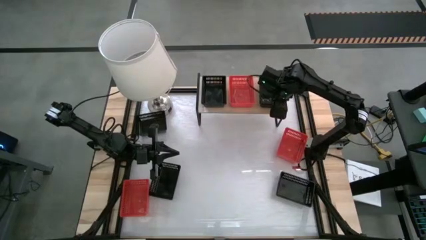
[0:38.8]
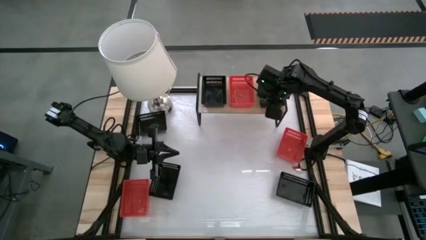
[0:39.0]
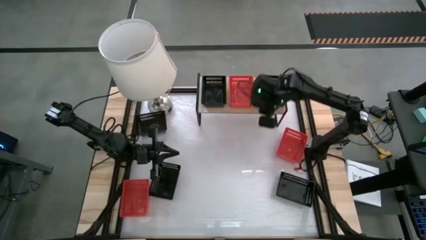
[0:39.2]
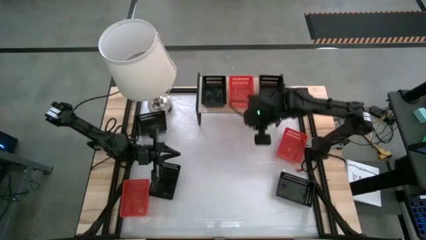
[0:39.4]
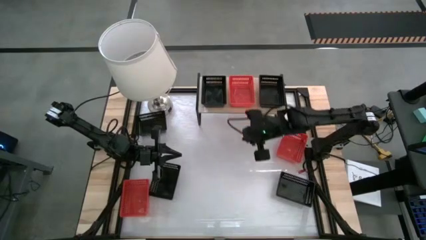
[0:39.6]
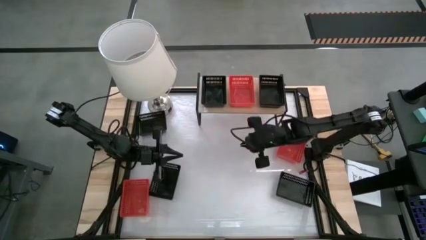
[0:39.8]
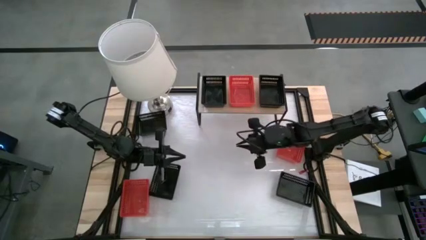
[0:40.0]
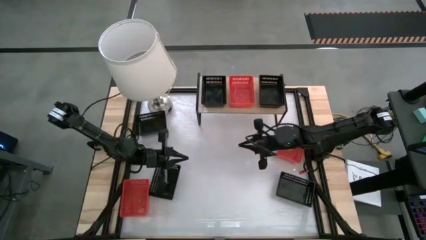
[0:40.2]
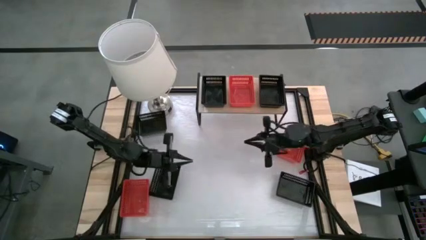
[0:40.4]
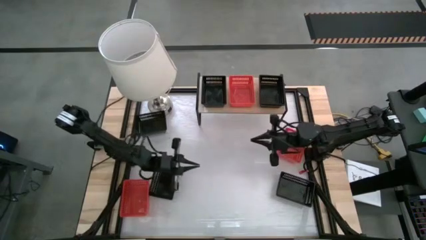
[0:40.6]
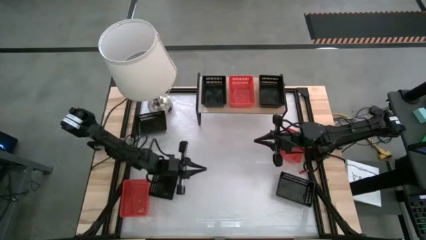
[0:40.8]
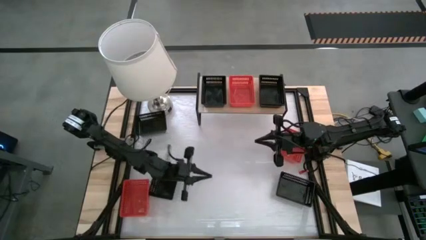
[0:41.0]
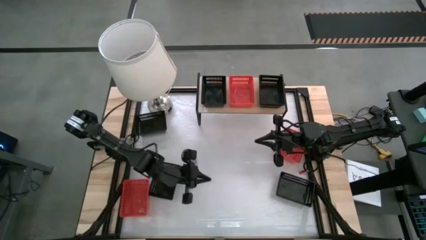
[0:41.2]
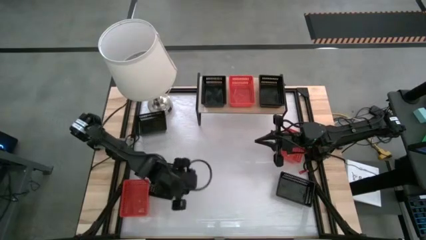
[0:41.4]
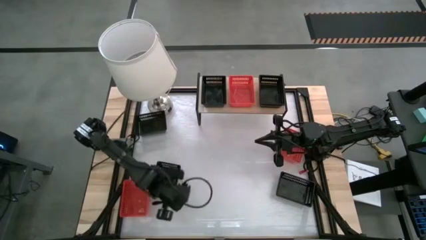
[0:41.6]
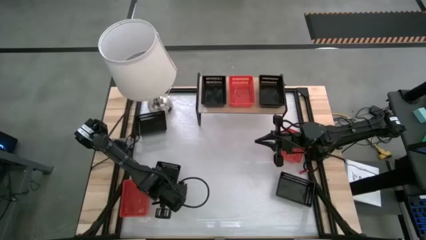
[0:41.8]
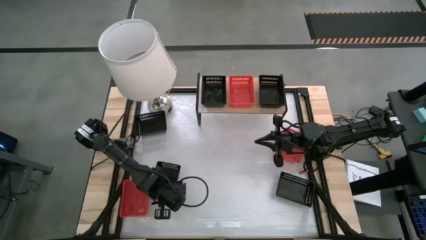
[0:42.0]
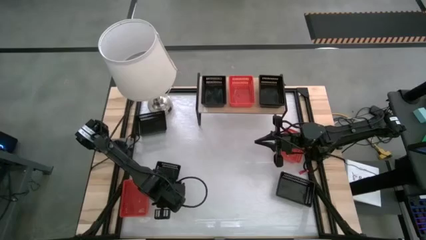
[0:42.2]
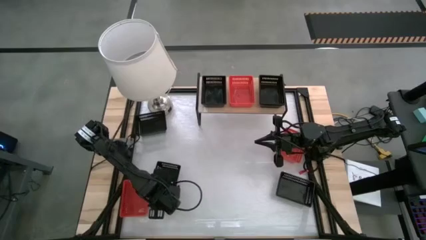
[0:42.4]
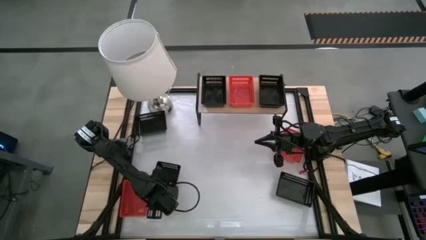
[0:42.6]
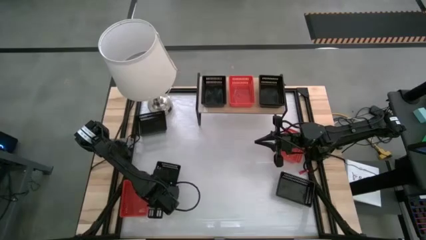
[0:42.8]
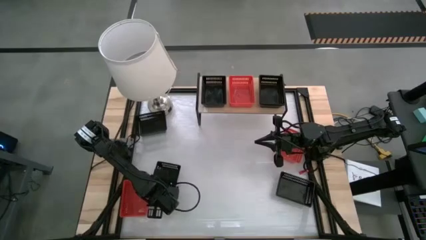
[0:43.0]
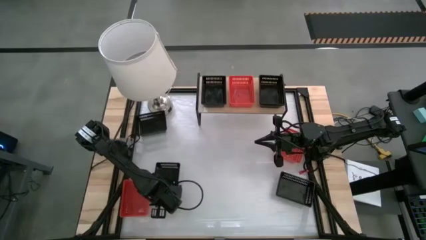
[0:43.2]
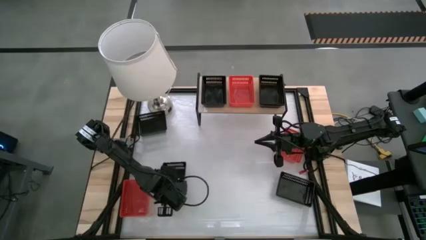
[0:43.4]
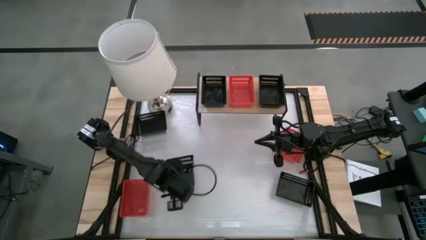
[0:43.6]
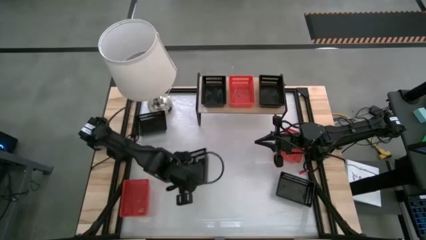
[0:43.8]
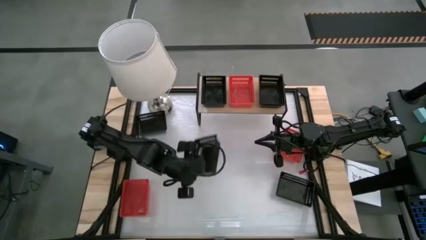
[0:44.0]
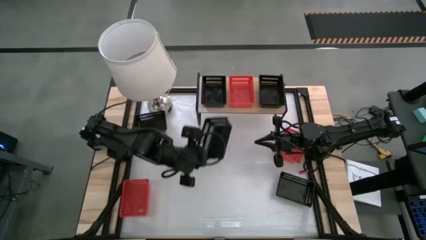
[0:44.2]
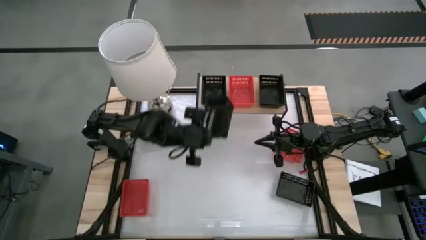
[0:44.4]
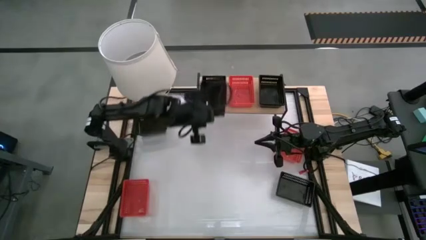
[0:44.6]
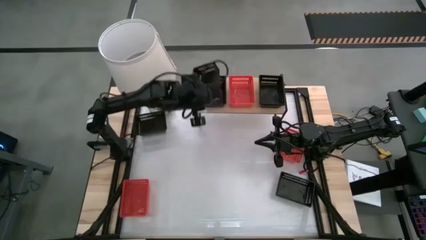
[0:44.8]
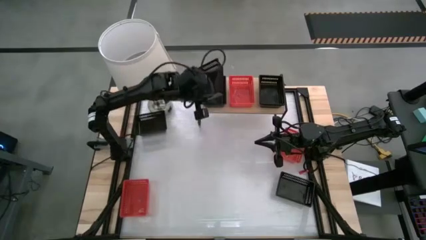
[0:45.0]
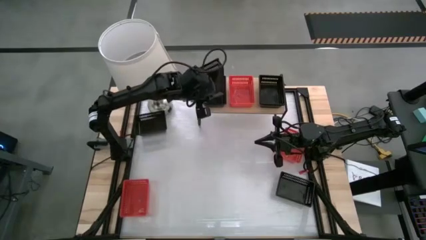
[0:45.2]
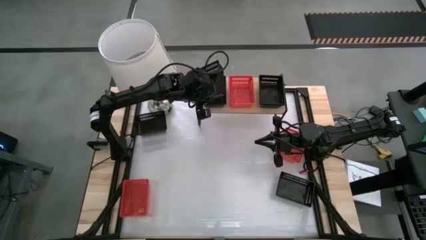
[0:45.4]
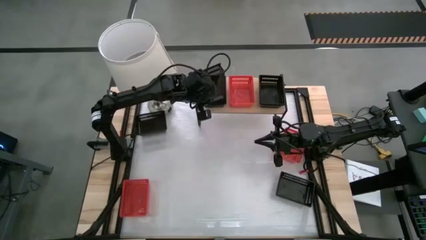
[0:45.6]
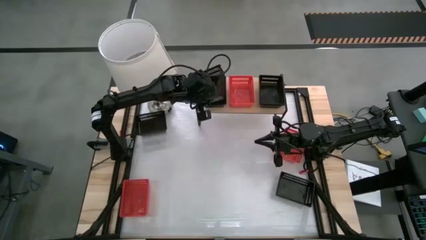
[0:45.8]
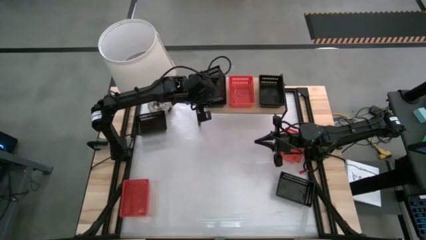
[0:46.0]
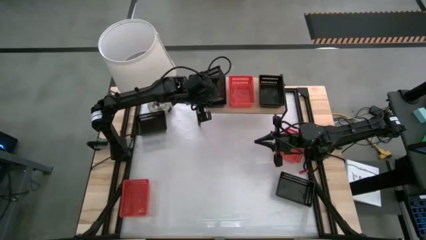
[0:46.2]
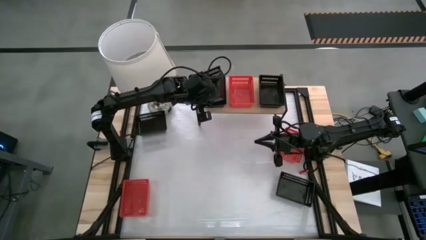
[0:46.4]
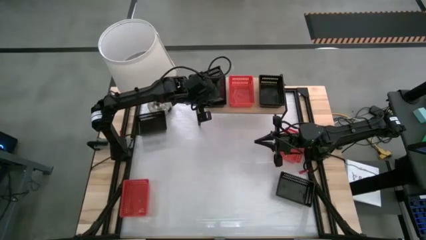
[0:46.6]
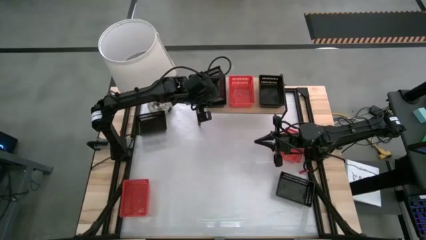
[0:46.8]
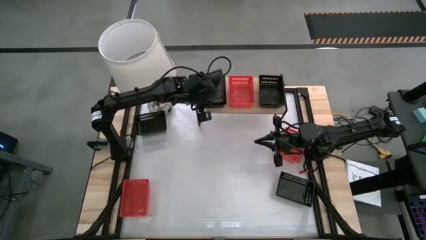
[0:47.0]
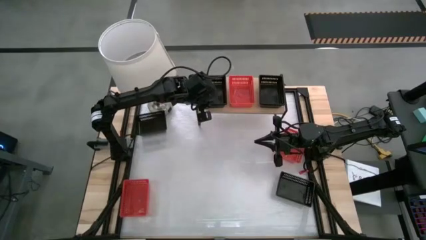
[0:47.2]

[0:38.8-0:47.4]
Task: Stack baskets on shelf by color
Stack the black bin on top of the other black bin on the shelf

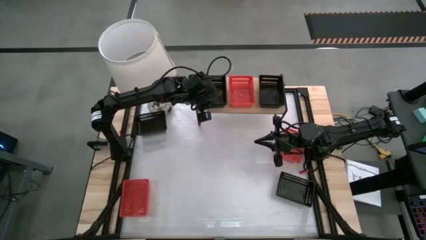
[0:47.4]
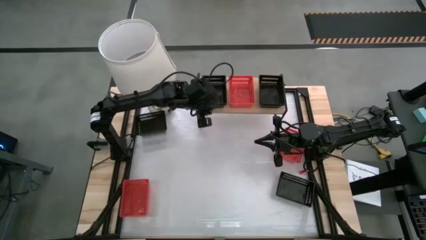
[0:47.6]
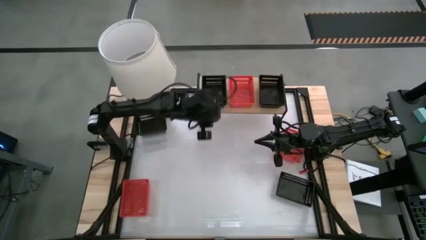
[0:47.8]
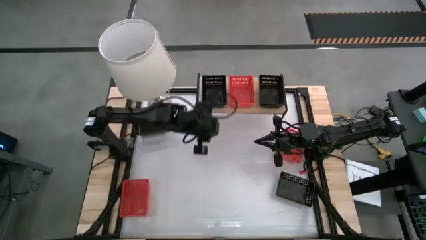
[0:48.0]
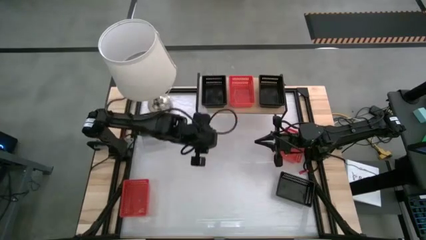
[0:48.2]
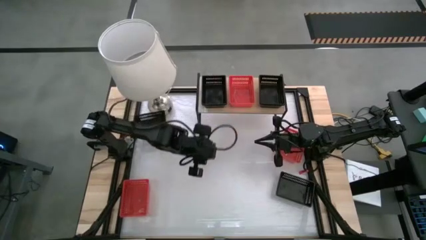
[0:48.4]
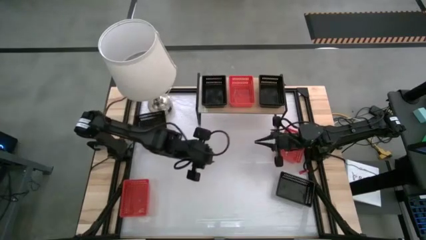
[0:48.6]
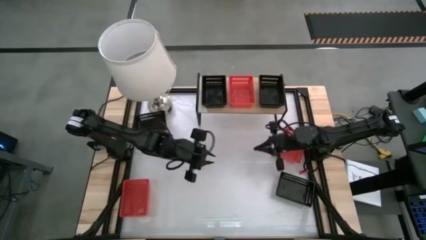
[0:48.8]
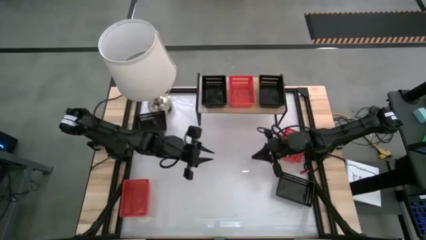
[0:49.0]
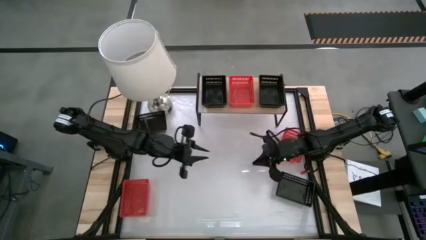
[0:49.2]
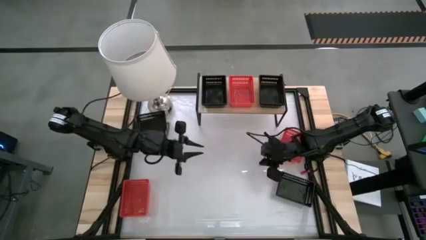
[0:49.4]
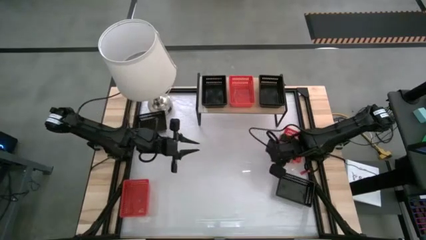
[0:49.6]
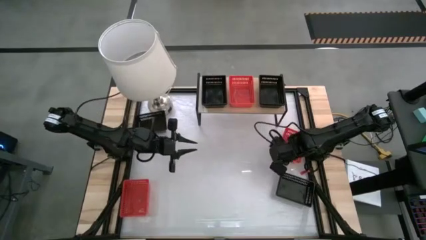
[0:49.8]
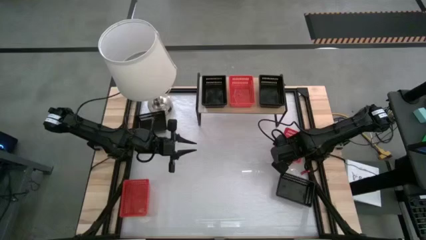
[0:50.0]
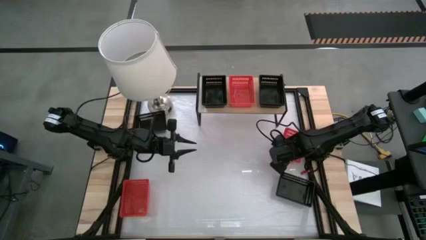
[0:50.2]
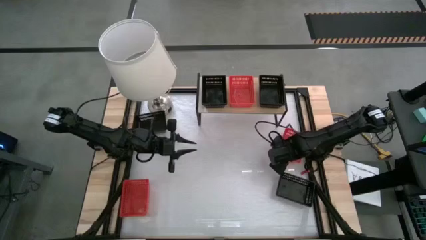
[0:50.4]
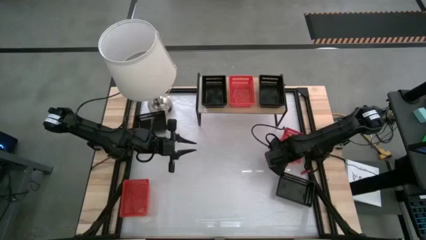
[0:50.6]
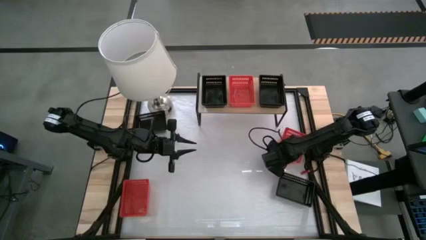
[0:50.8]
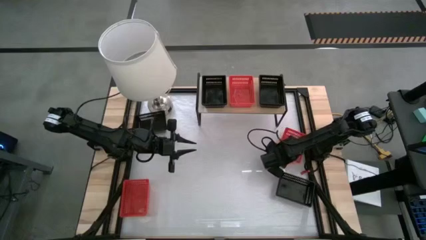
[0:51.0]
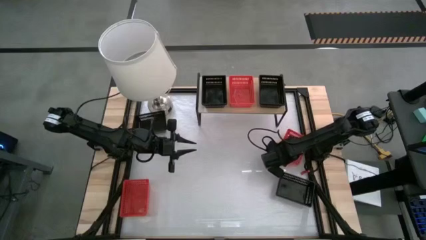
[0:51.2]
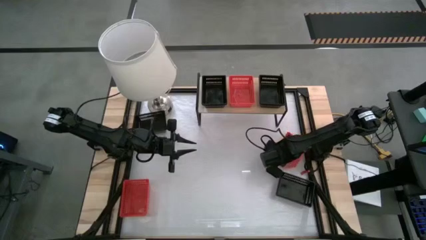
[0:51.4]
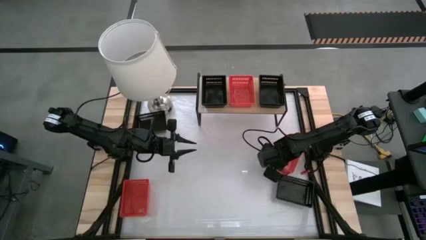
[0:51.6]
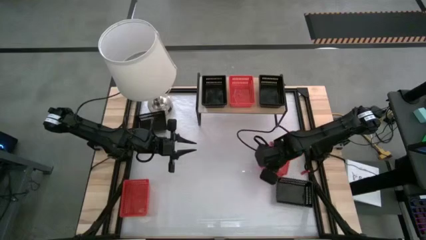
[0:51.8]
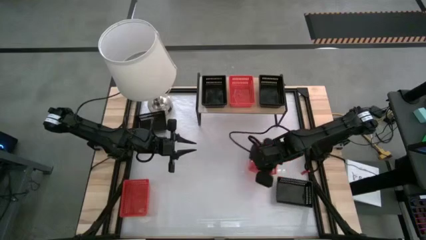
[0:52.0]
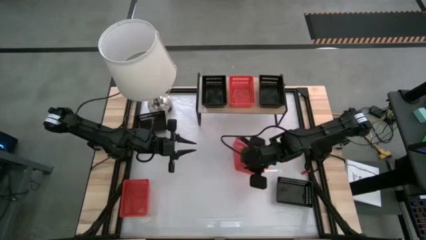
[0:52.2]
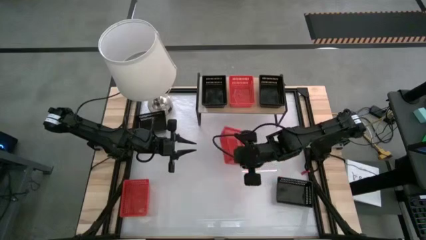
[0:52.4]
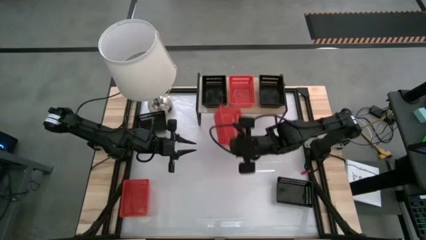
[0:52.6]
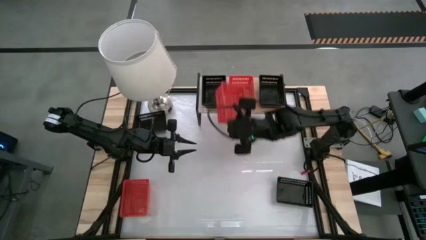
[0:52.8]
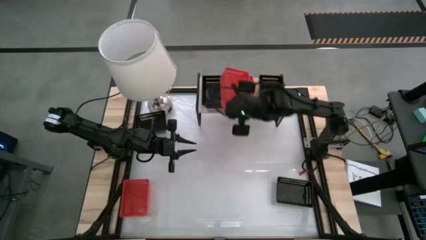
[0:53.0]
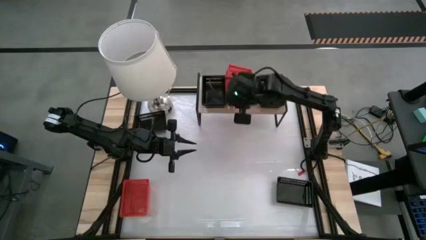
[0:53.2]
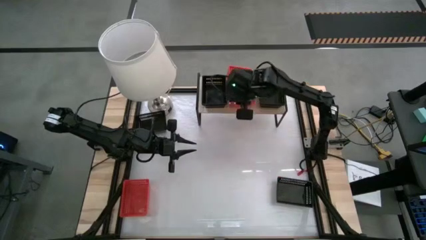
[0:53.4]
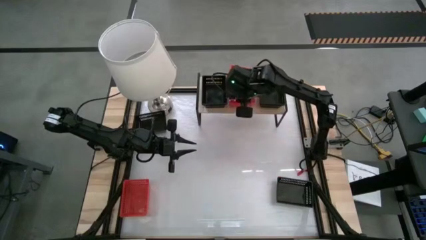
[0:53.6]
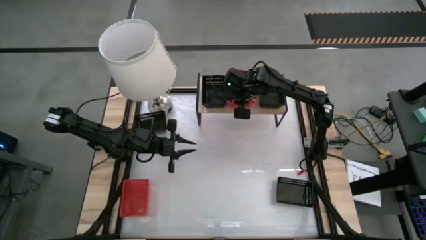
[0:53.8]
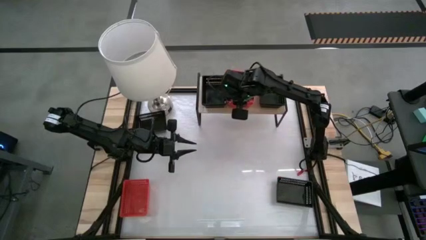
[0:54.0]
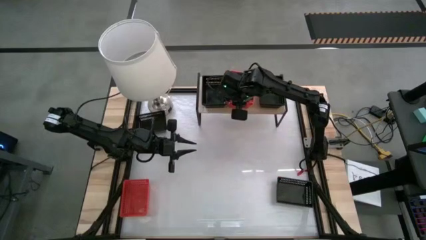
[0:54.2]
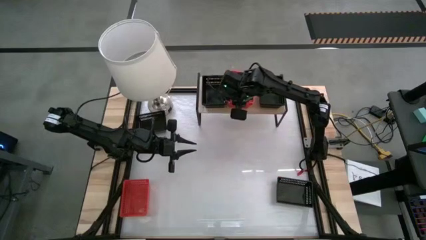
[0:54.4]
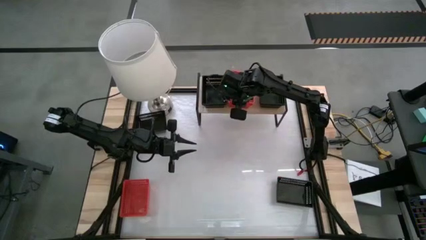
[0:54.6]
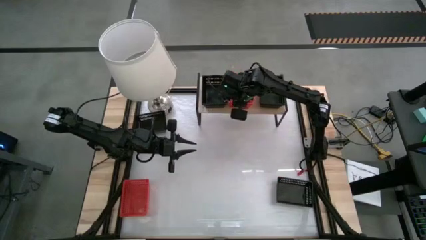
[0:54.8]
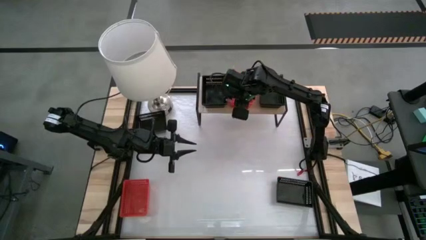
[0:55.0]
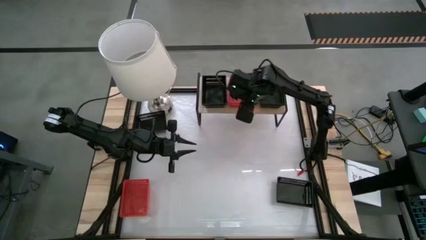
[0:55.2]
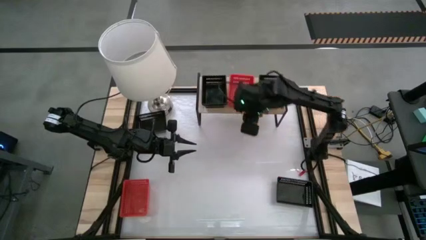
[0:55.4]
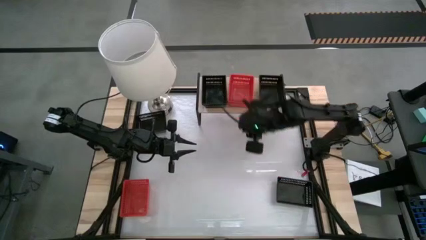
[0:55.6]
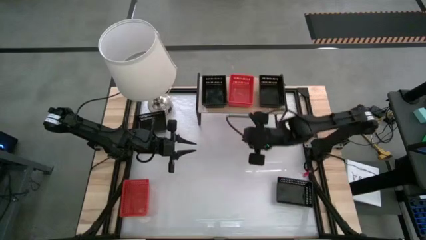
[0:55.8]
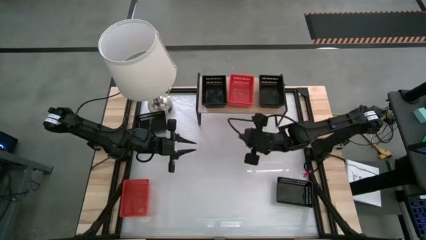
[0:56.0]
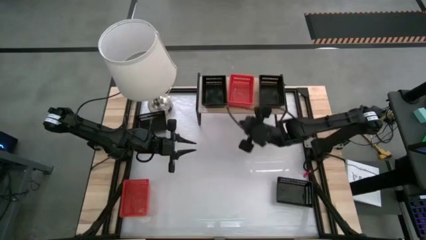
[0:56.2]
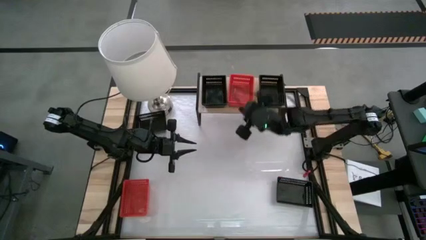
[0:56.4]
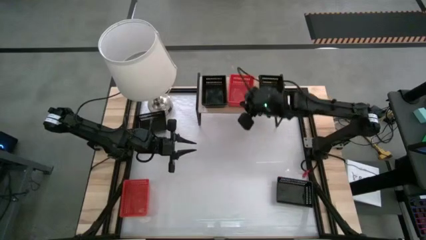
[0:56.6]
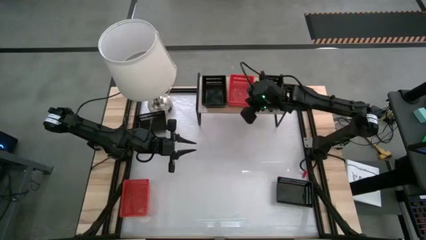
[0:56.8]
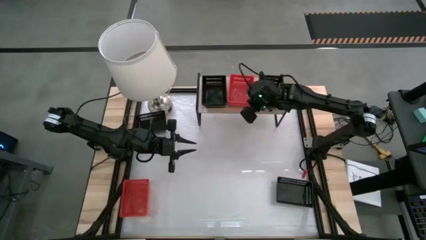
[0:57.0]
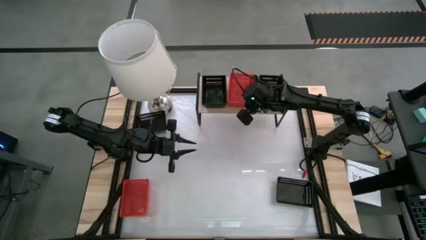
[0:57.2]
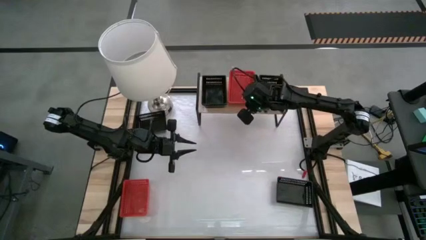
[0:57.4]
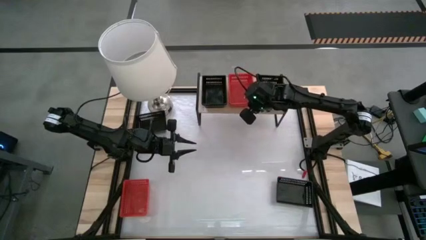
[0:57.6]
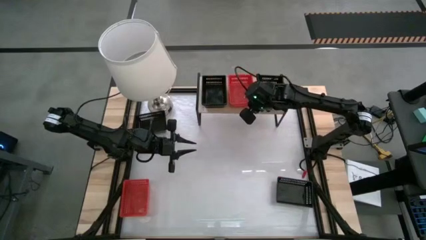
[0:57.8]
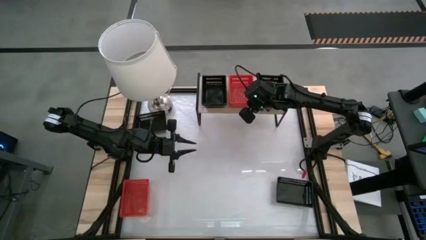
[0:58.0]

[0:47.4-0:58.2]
Stack the red bin on top of the other red bin on the shelf
